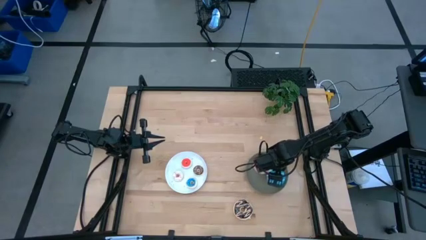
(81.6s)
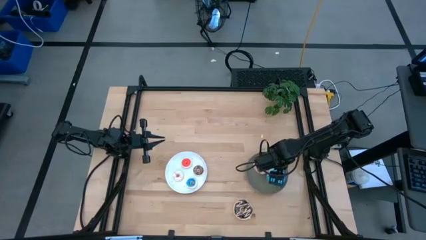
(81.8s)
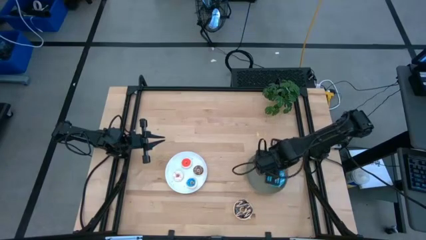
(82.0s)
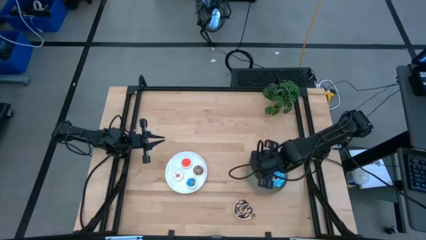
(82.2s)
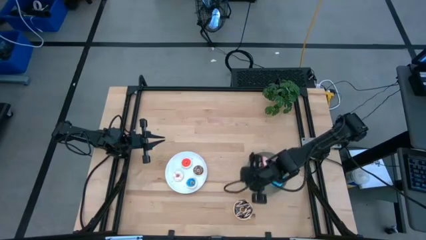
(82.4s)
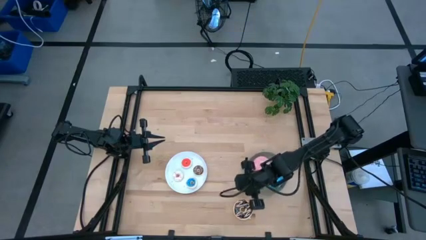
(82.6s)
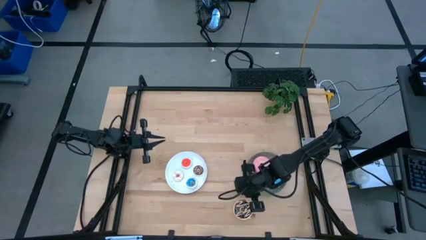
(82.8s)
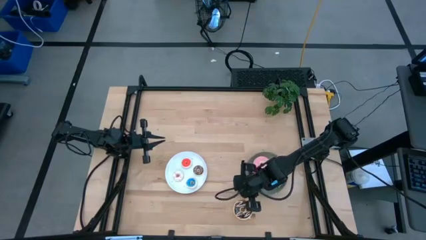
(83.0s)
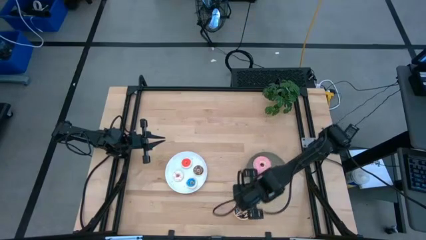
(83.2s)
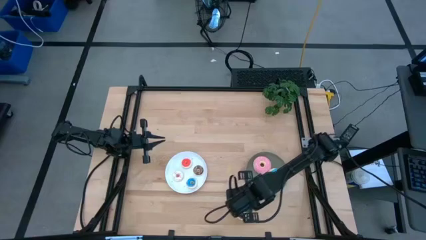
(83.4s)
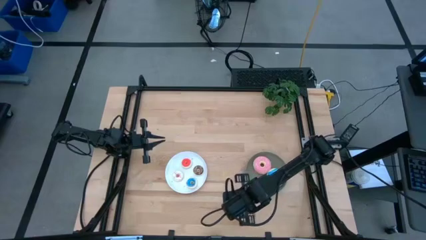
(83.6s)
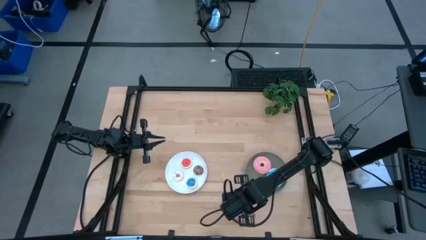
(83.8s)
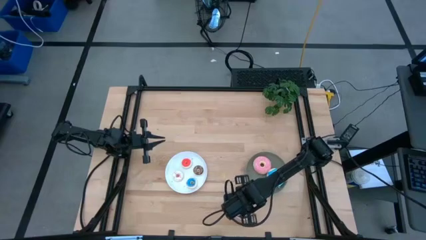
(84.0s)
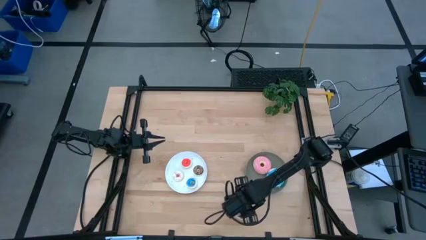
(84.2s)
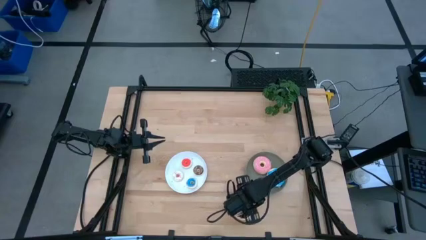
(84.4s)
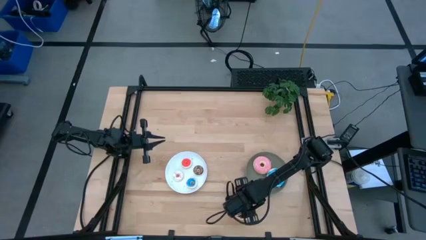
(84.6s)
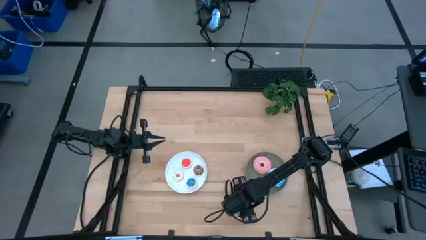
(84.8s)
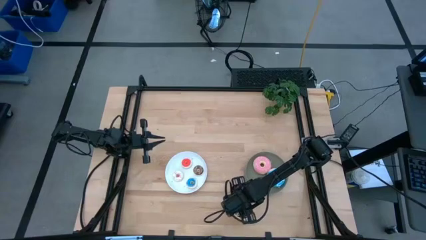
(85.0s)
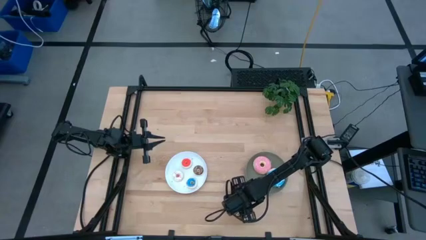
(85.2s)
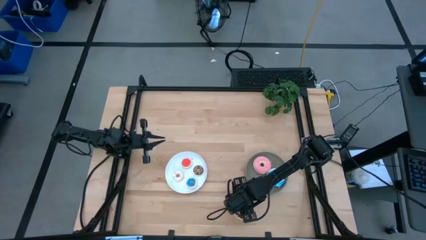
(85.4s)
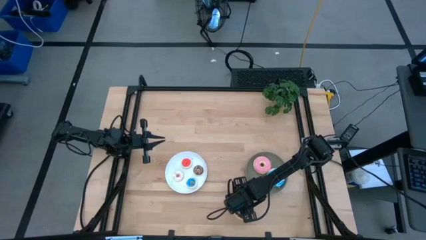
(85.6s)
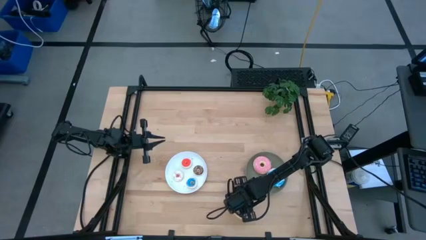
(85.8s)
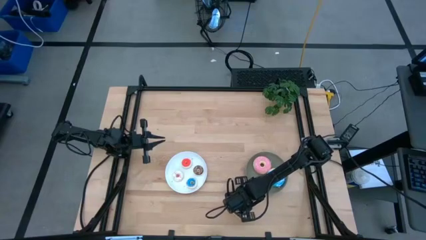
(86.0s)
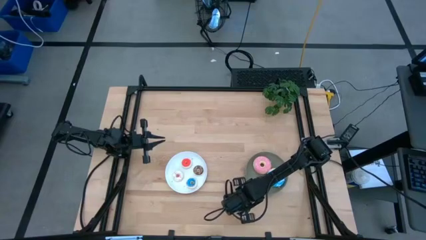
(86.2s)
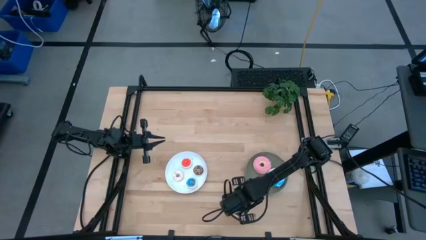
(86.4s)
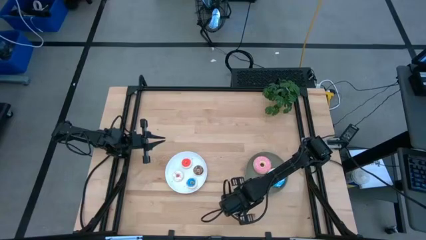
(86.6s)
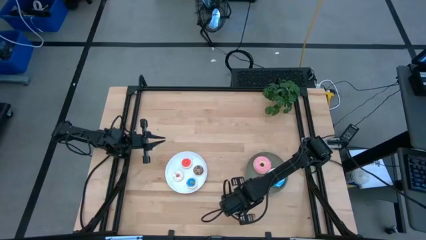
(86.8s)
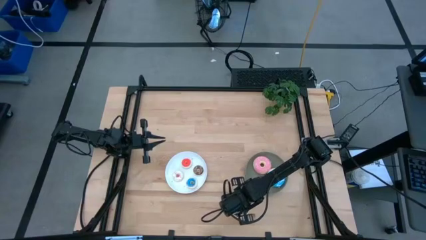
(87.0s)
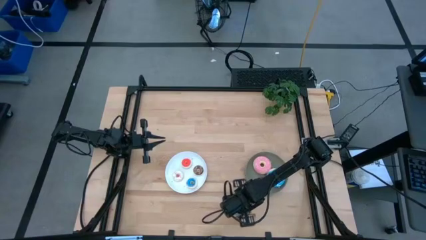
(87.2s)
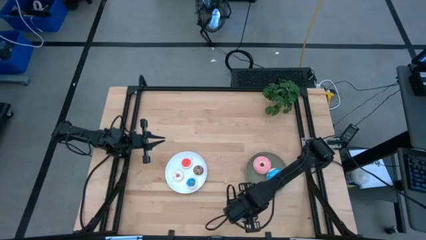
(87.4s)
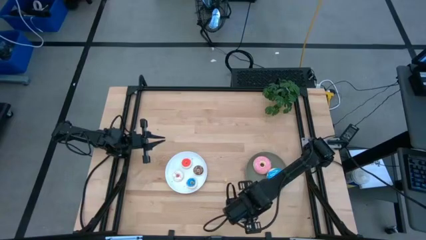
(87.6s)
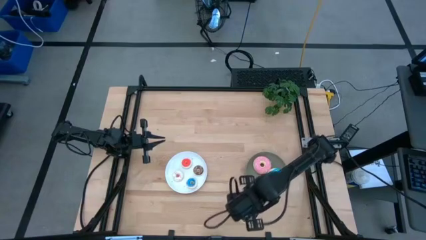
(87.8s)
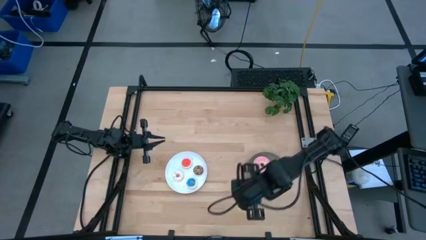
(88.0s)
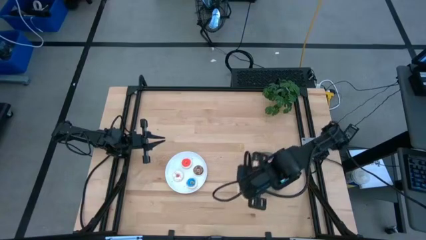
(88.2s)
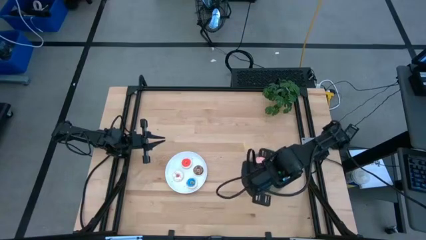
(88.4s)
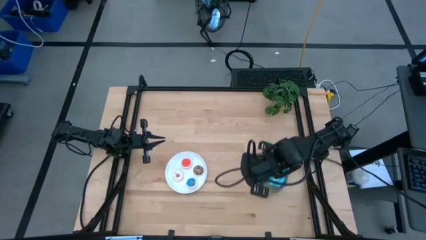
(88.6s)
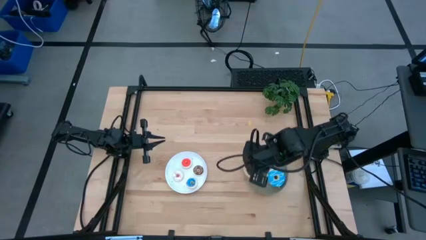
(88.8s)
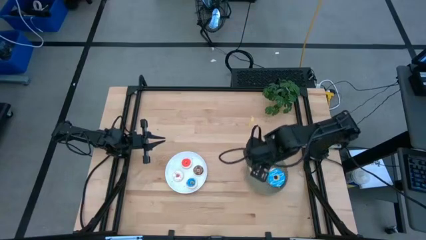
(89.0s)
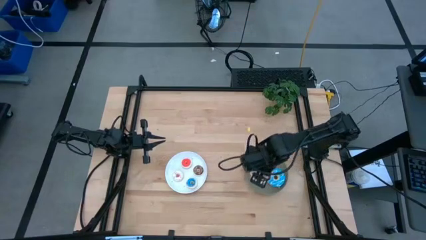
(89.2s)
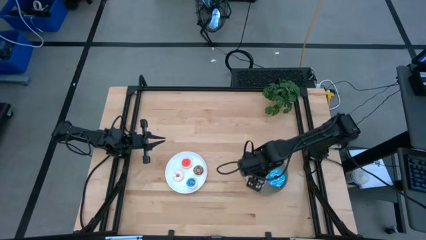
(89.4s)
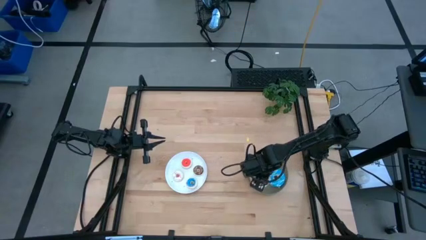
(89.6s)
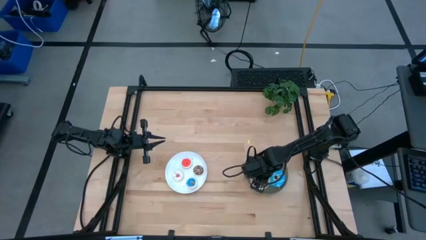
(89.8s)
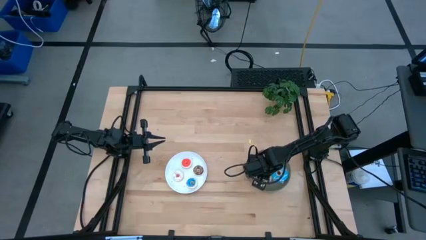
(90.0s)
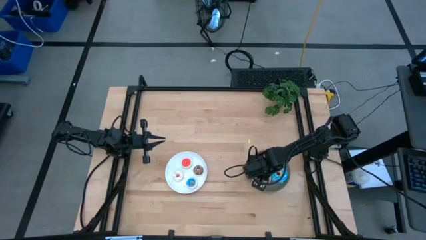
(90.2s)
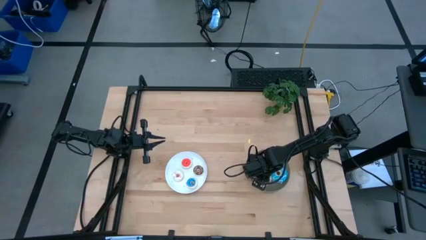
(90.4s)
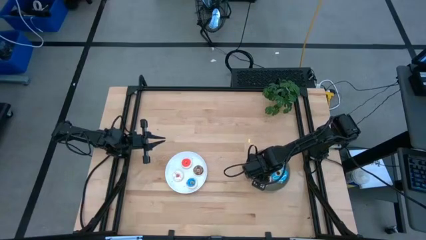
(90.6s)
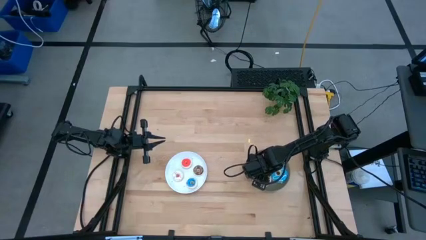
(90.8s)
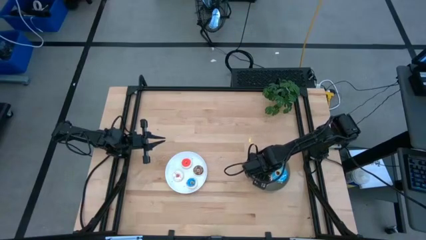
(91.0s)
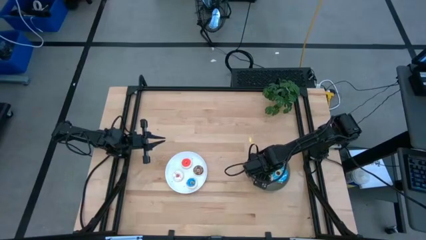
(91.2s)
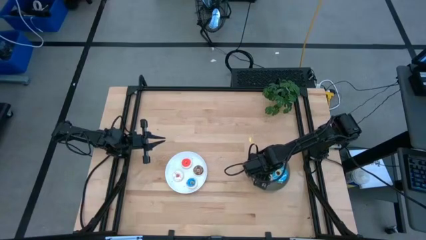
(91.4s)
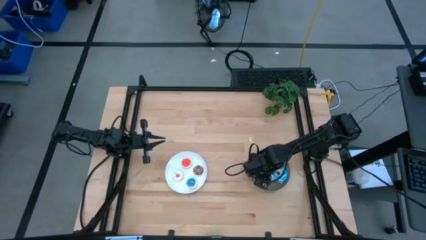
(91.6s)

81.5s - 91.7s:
Task: Pick & Place donuts
Put the large black donut on the gray plate

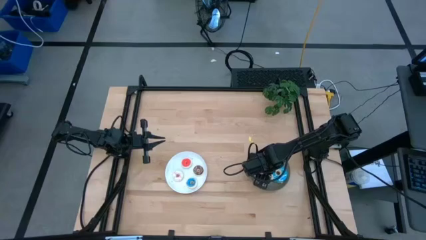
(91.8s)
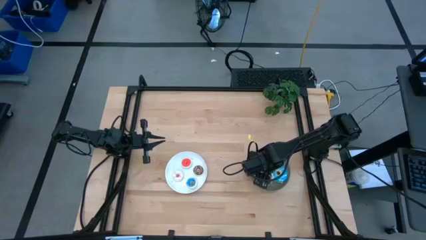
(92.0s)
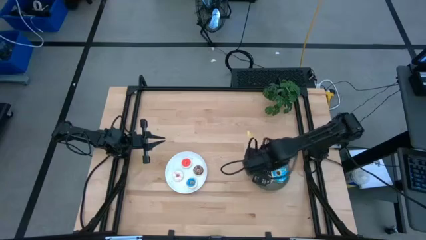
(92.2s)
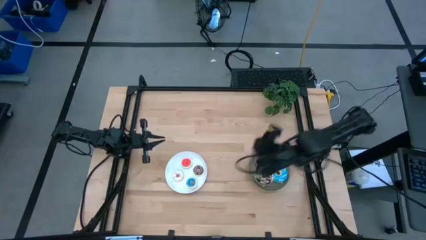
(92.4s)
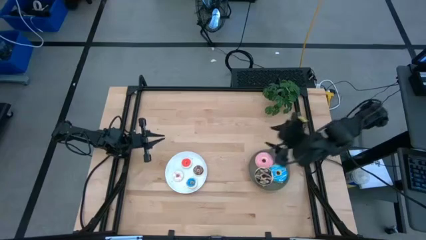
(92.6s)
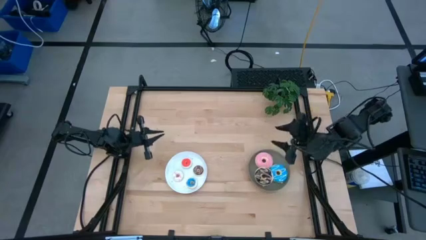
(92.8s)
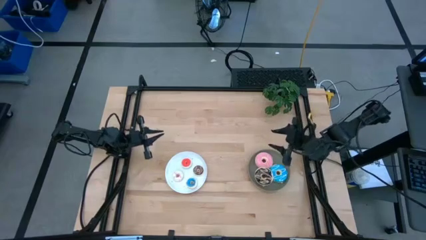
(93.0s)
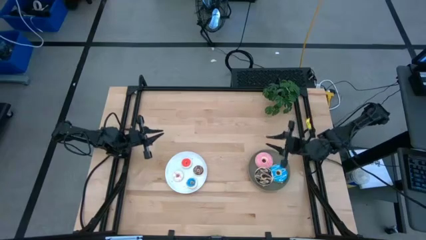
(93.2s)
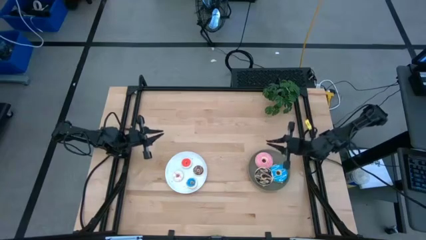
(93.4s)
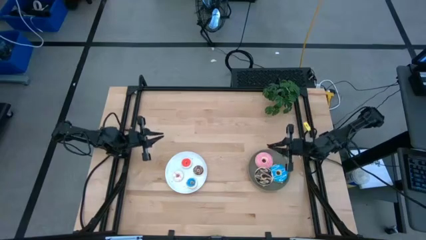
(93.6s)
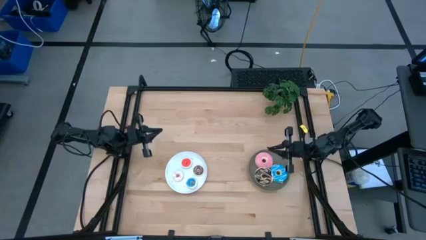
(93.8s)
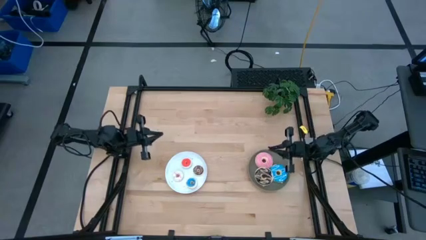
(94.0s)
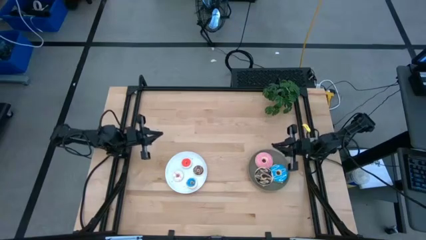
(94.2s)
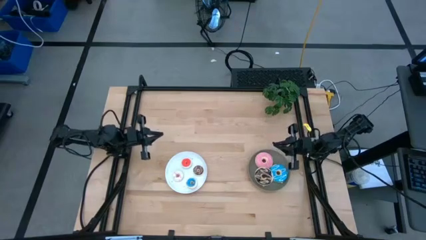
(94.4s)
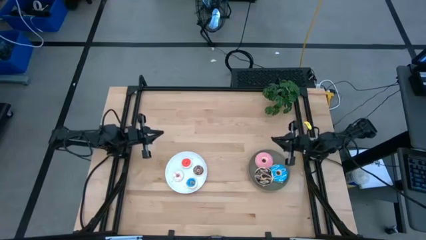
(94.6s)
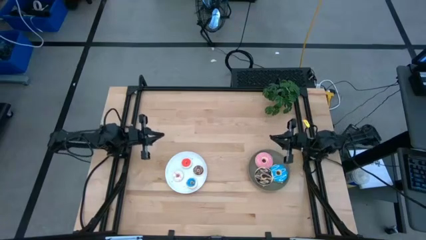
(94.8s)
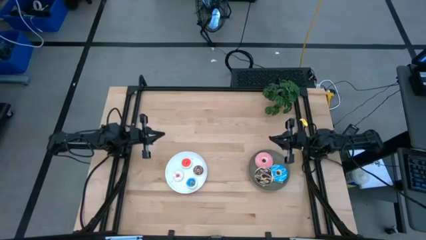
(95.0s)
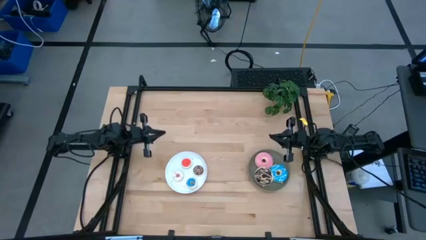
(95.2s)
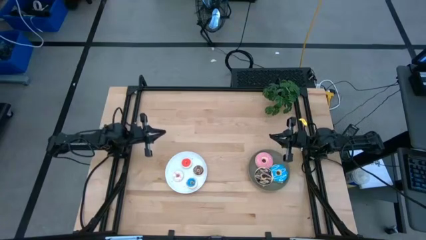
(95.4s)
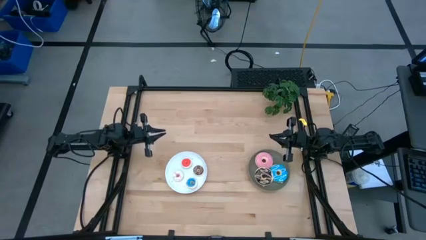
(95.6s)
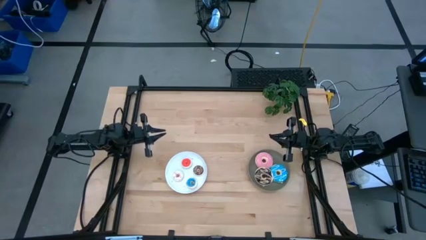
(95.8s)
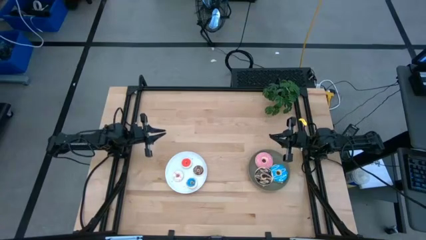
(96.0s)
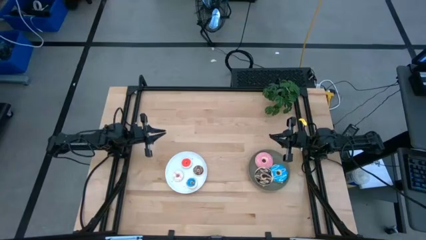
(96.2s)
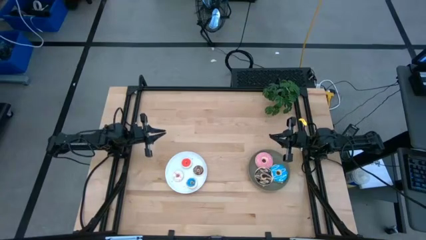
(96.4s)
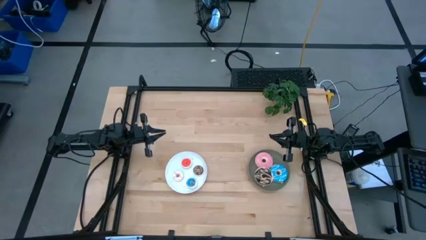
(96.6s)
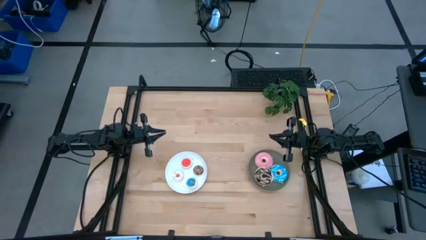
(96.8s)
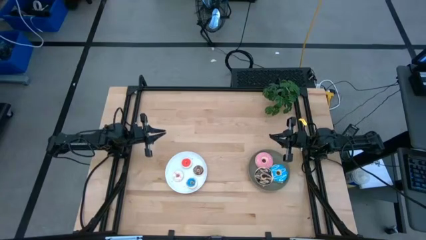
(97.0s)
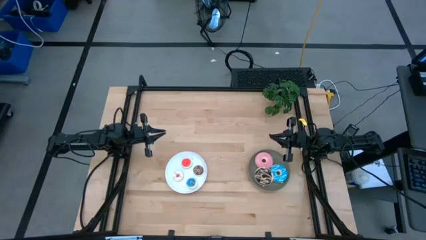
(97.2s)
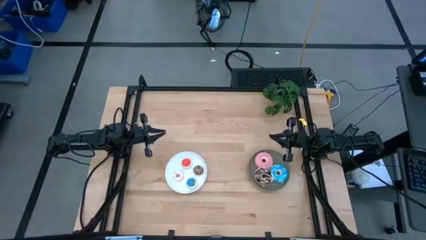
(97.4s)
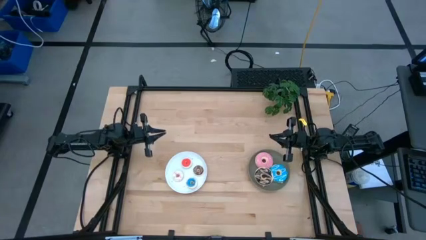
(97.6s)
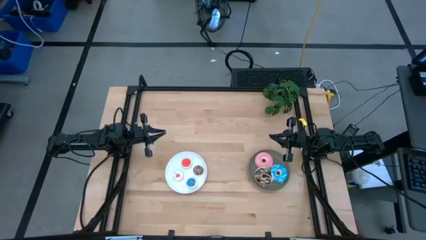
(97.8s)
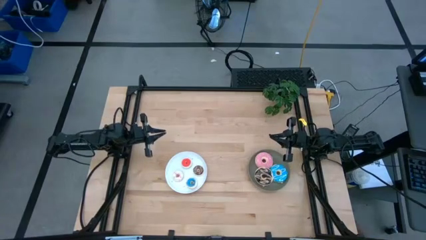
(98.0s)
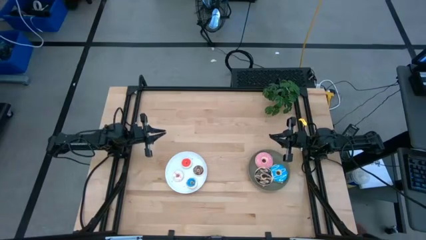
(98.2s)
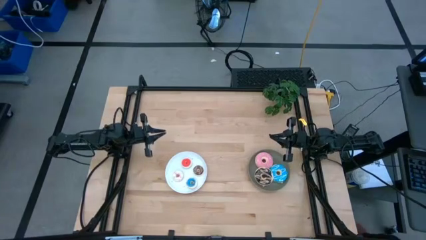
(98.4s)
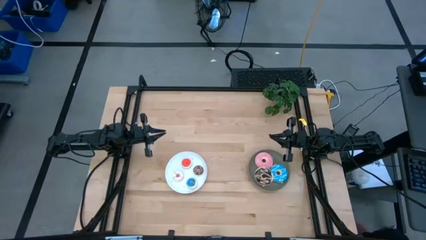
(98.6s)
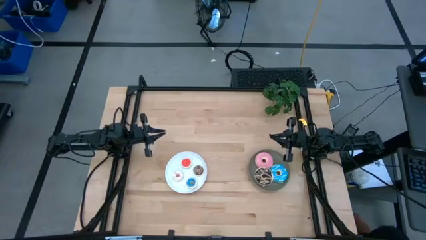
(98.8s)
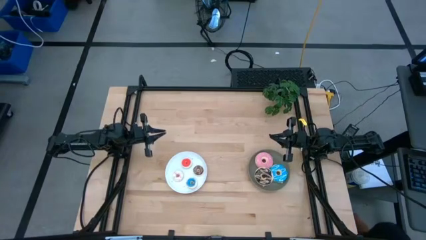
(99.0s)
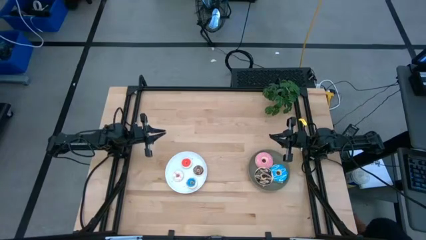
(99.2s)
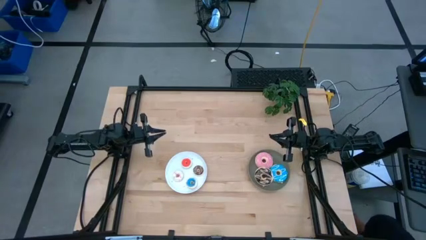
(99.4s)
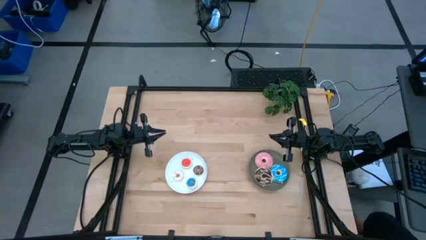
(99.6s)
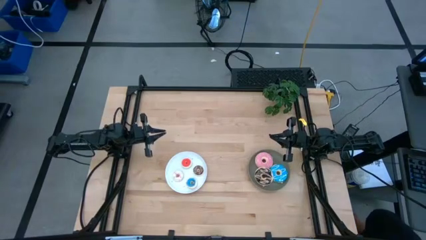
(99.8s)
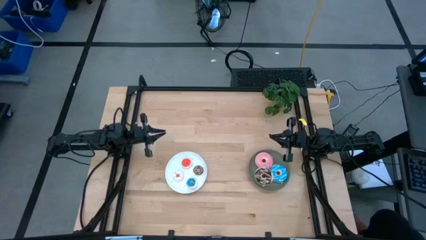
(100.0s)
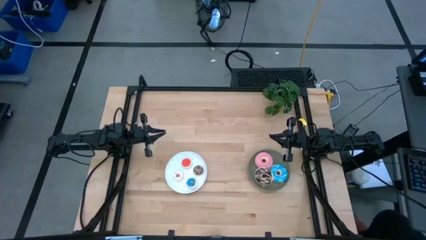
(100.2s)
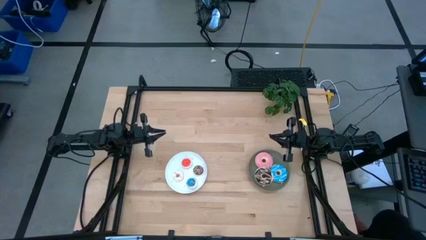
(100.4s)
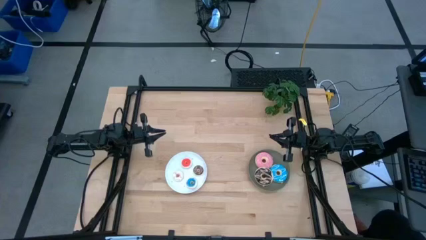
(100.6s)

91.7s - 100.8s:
Return to Home Position
